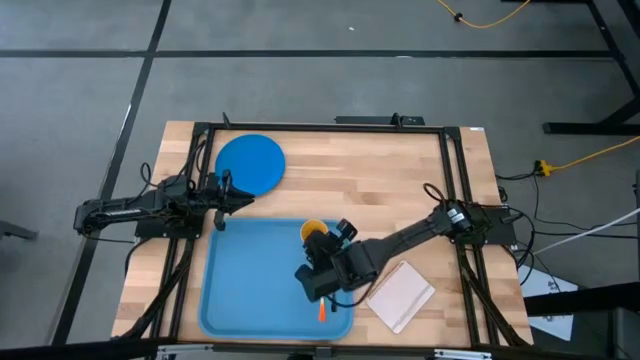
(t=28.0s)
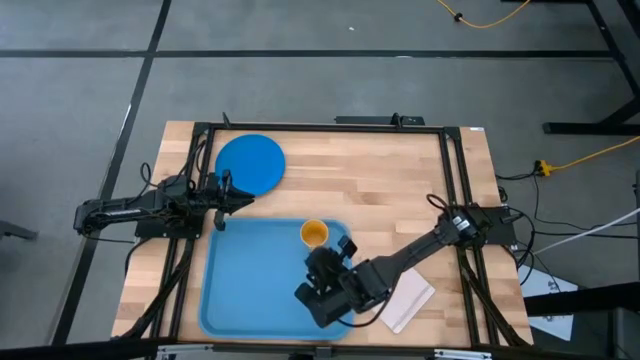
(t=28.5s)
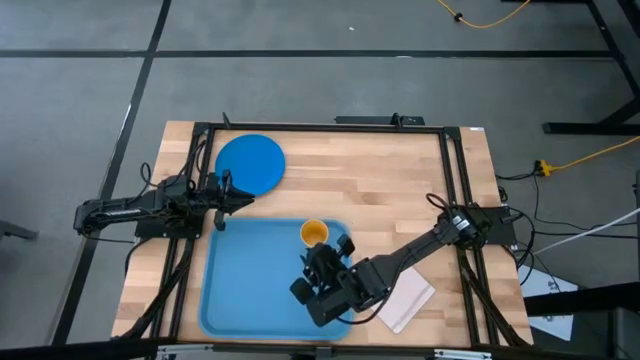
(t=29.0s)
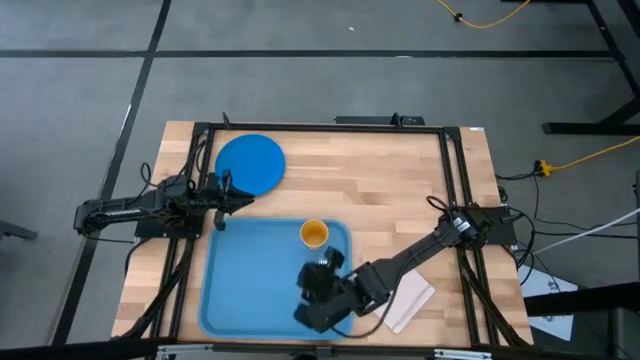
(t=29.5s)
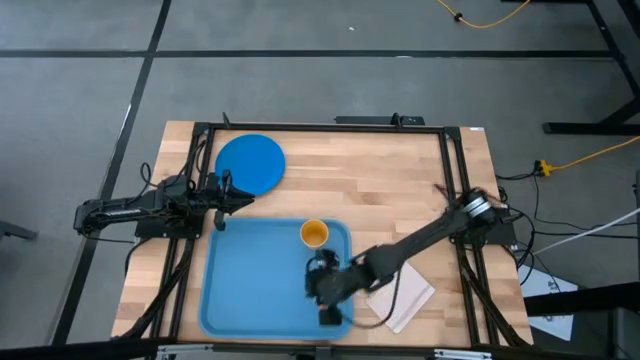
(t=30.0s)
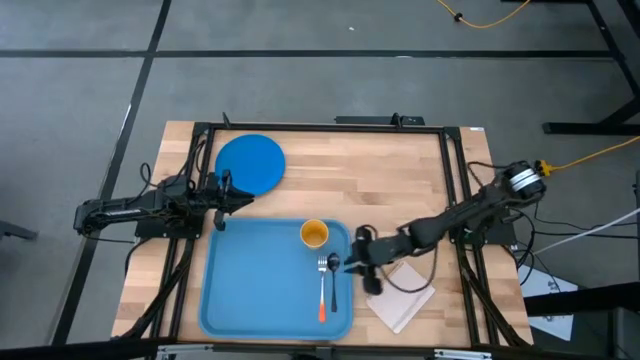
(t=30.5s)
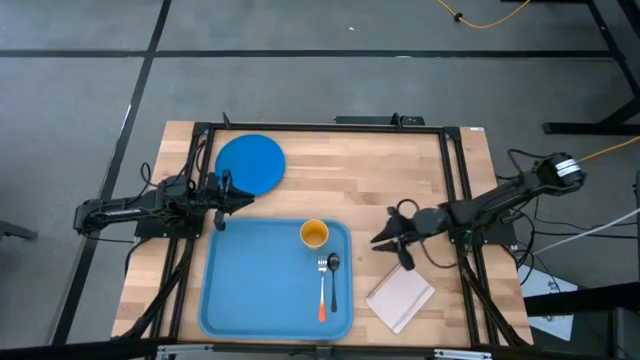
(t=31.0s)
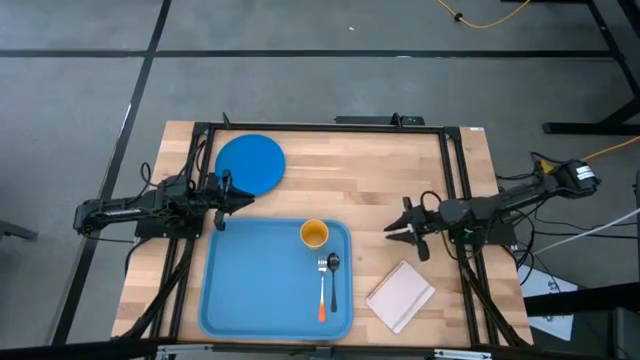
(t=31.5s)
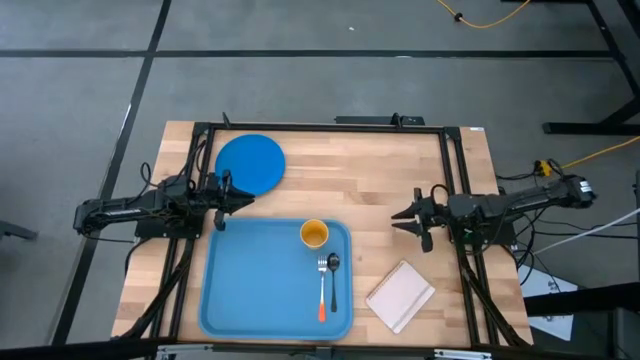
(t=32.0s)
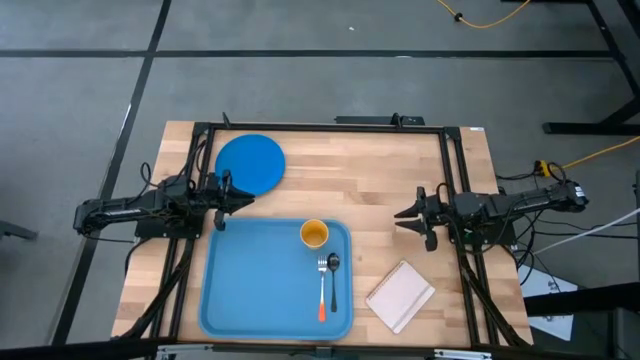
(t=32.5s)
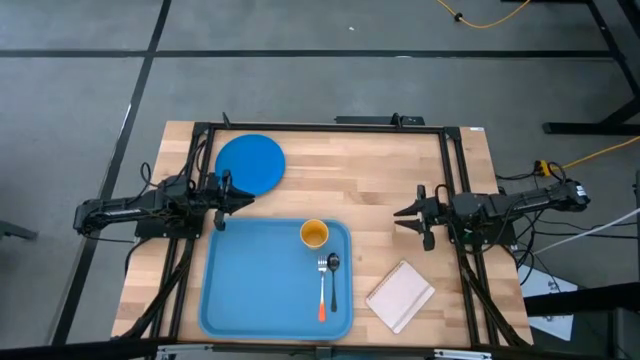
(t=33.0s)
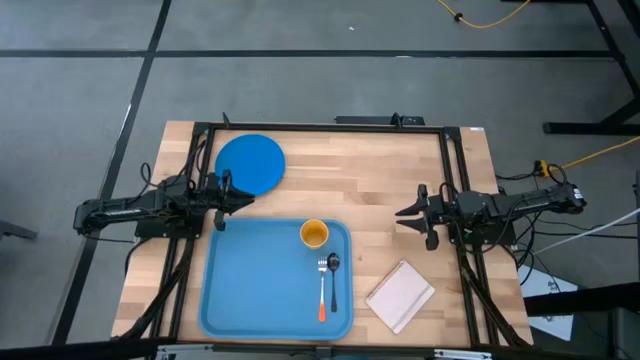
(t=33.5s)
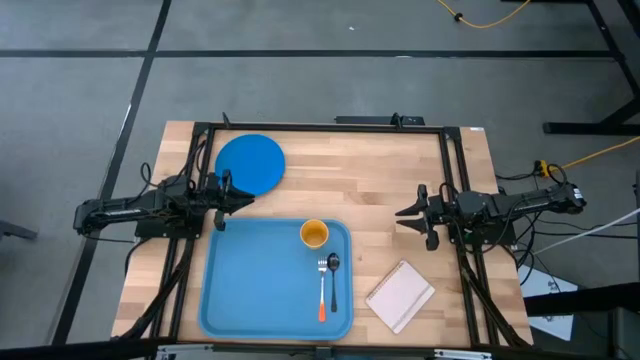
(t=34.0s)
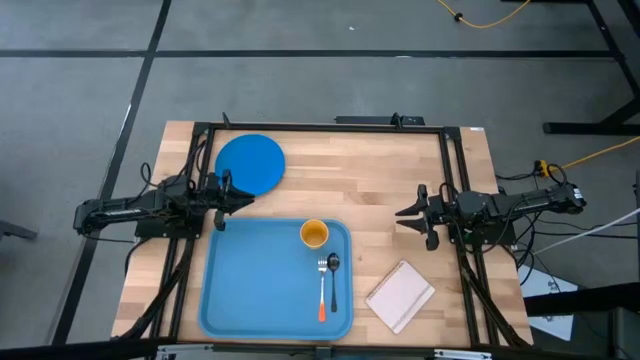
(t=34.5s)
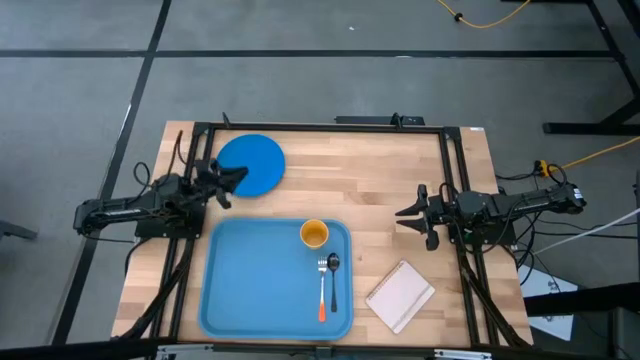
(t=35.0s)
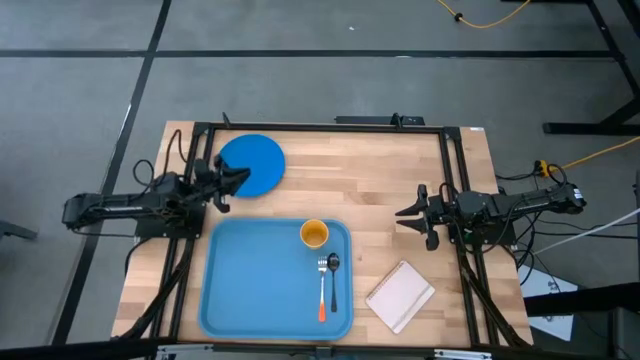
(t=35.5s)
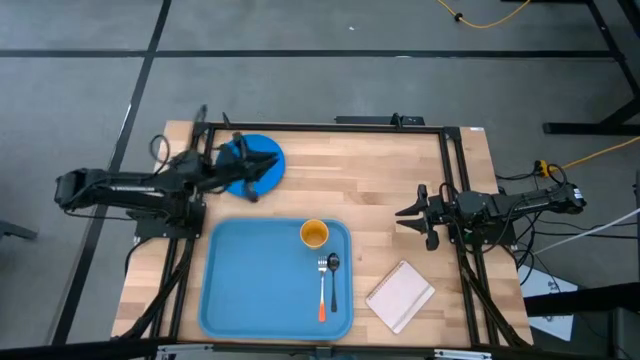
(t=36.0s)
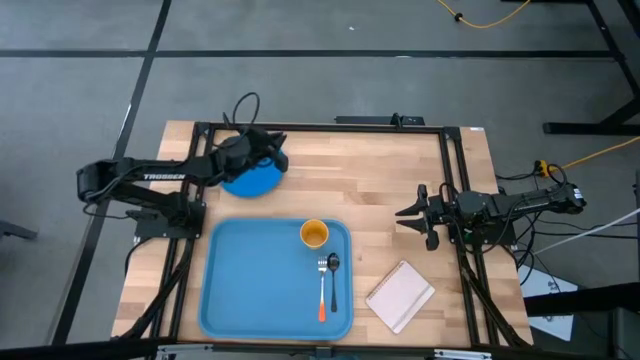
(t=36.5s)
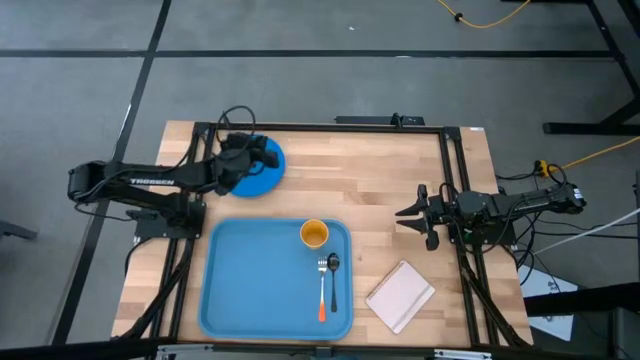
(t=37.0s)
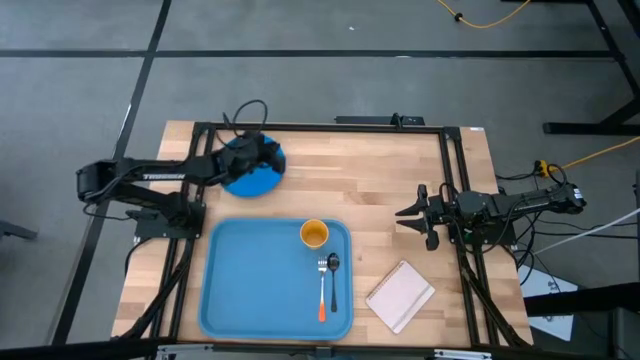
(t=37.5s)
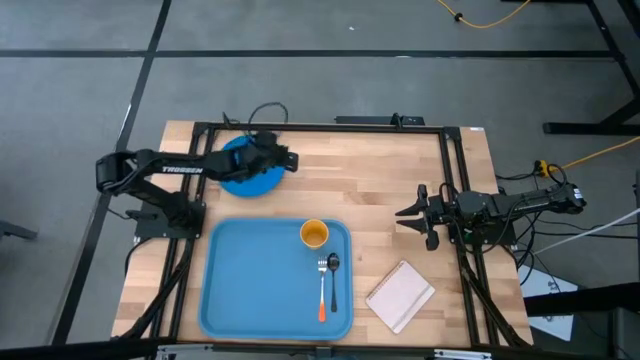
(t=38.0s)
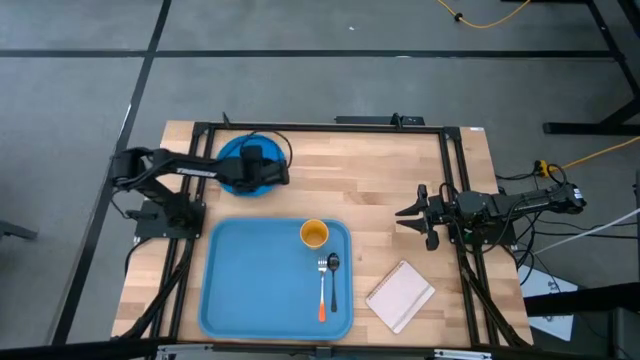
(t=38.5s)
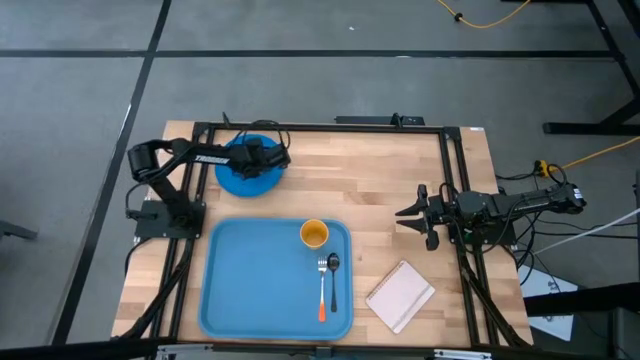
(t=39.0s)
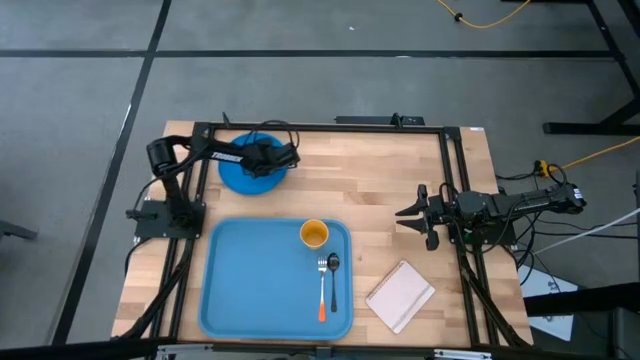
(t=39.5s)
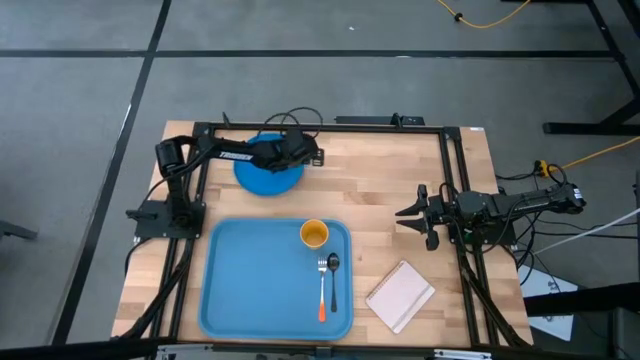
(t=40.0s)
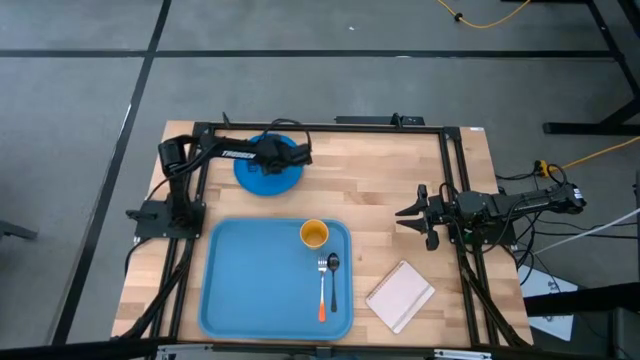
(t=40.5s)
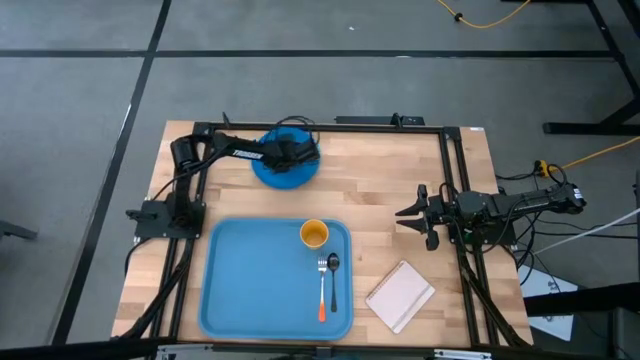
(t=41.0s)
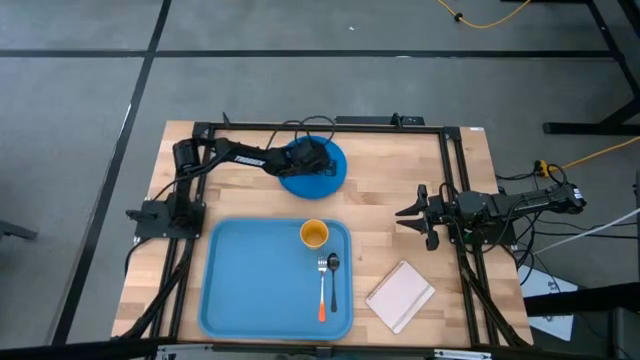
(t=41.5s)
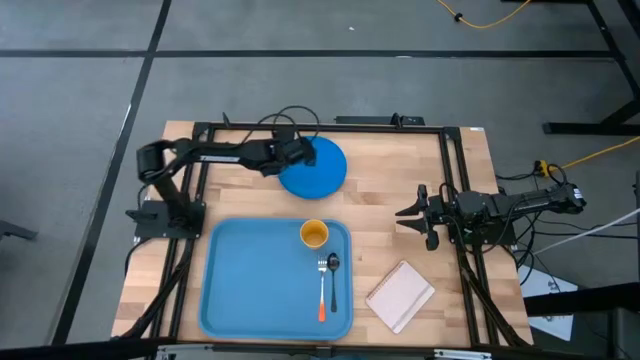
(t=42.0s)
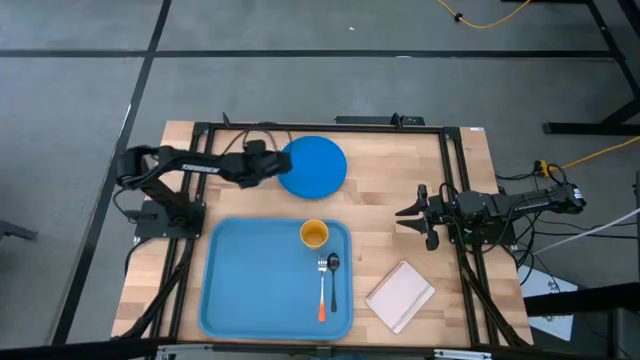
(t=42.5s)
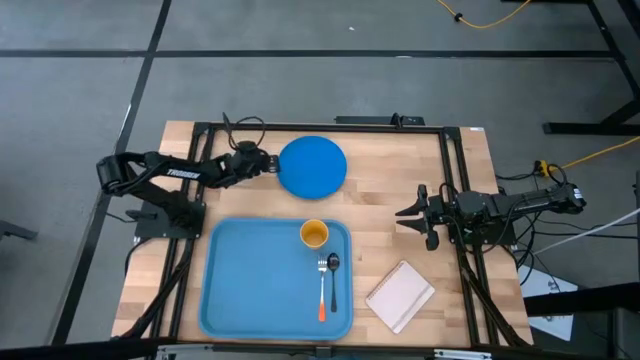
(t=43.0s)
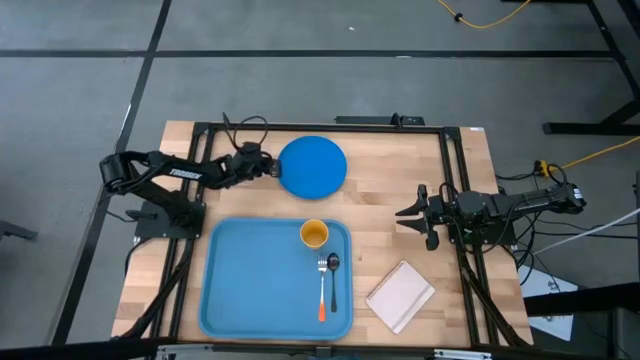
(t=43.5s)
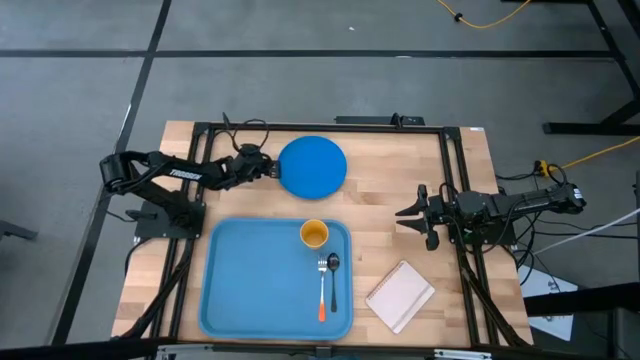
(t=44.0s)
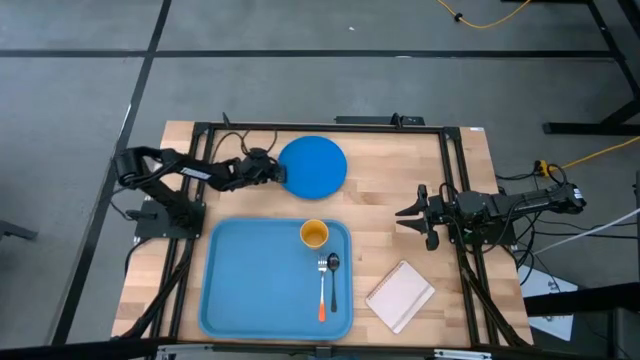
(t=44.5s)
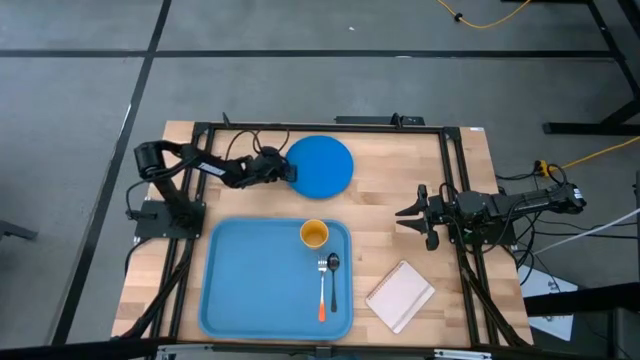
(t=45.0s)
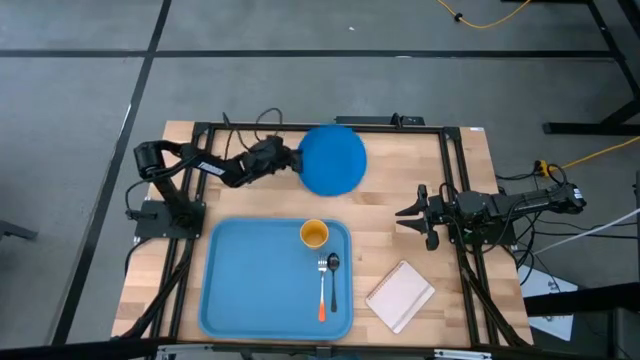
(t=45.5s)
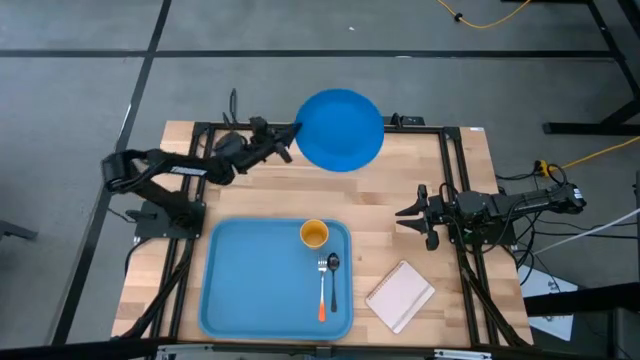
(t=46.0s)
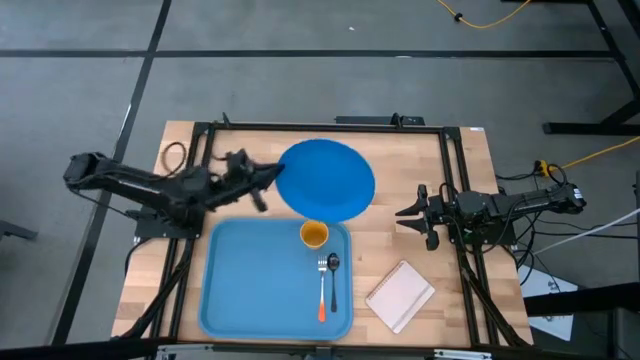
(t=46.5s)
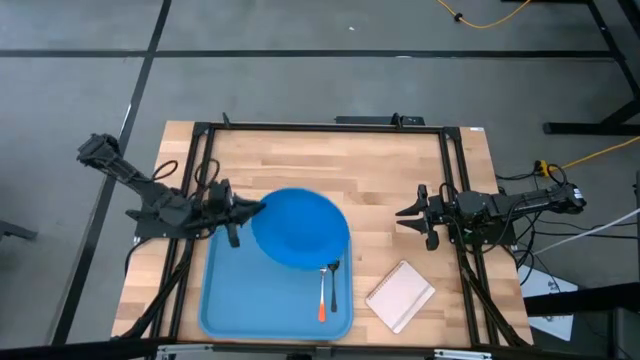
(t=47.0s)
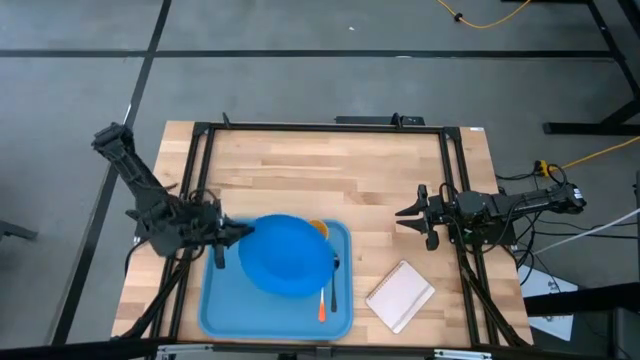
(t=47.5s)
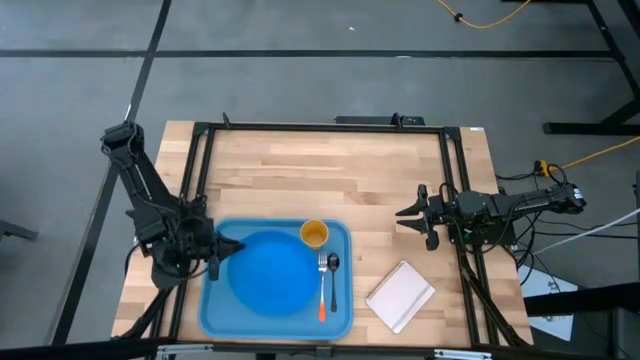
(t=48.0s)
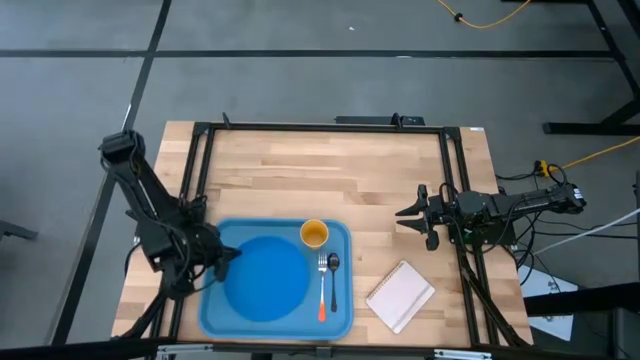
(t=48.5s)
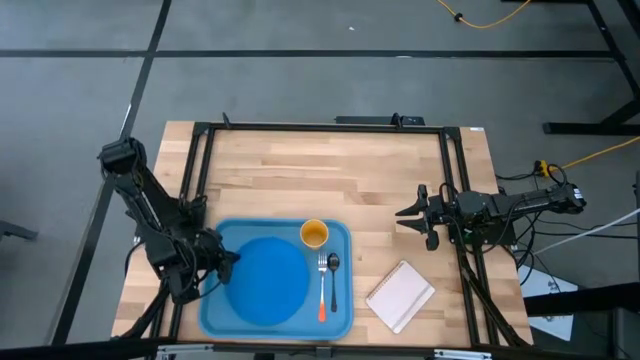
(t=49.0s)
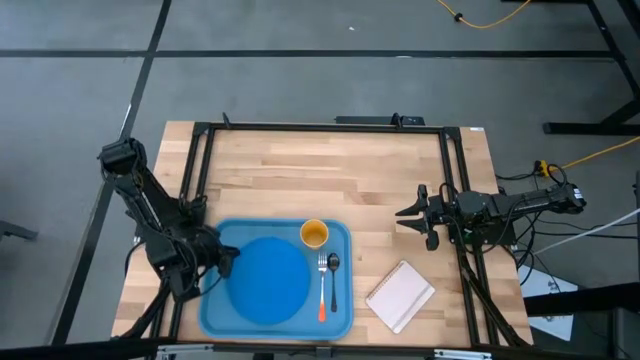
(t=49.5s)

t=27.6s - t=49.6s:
Task: Pick and place plate/cup/fork/spoon on tray
Put the blue plate on the blue tray
